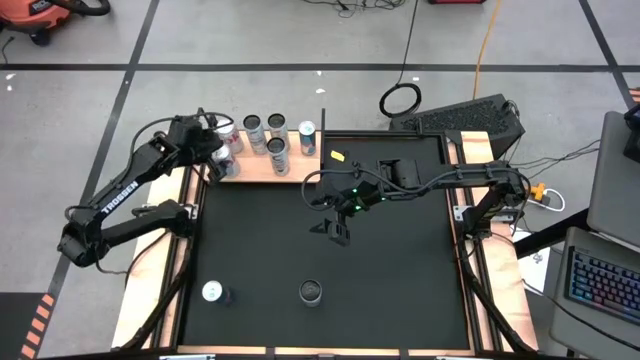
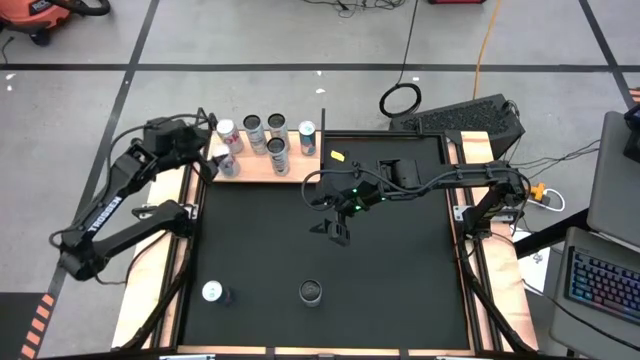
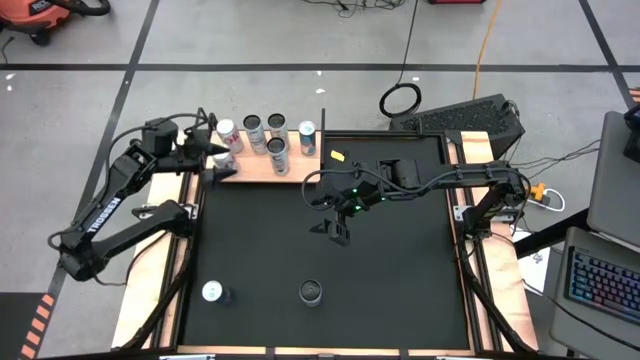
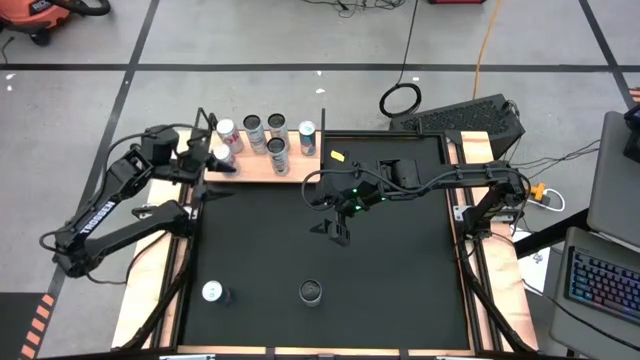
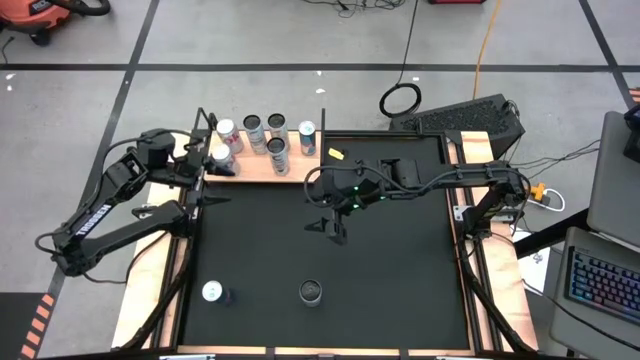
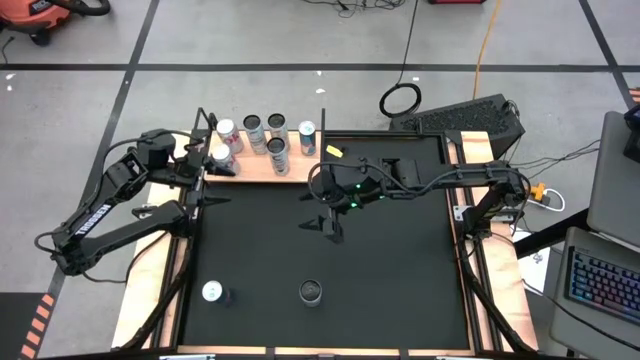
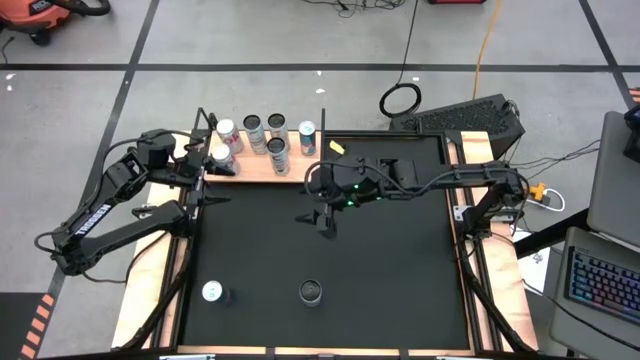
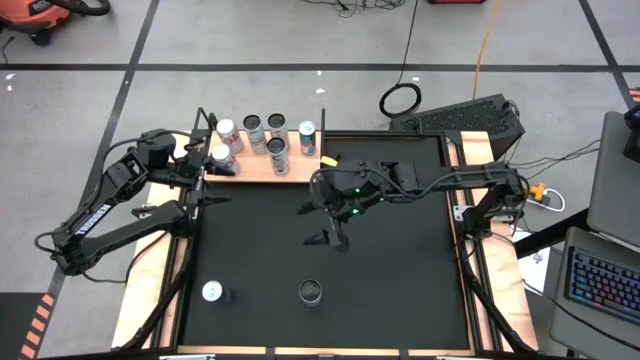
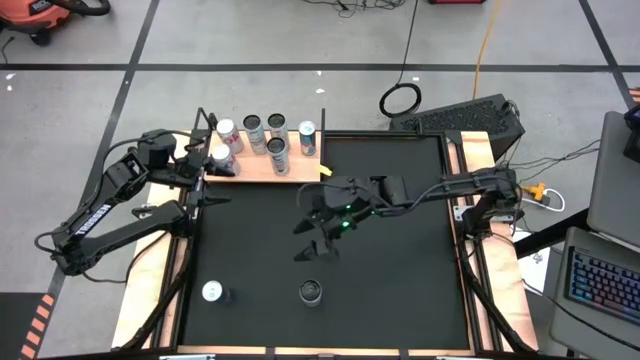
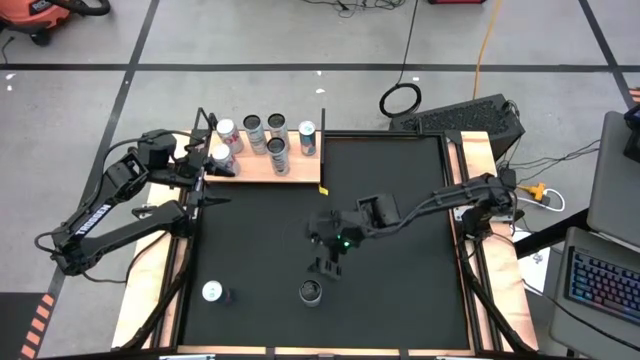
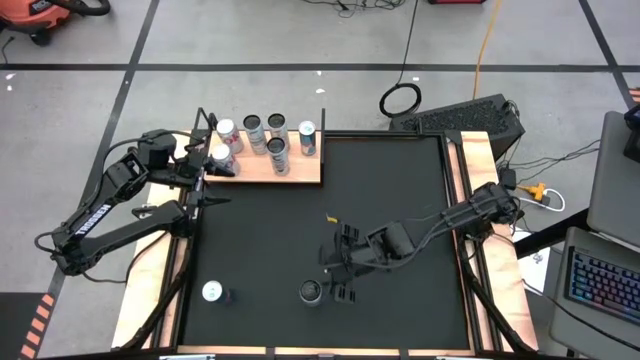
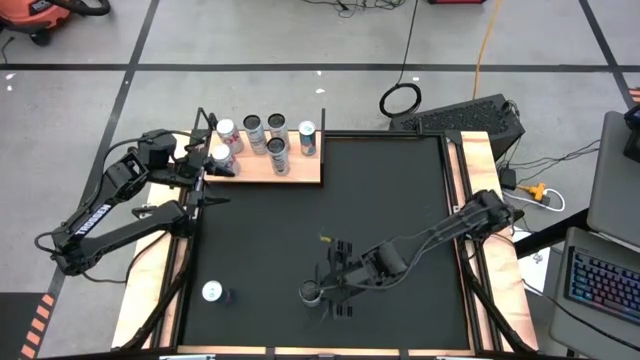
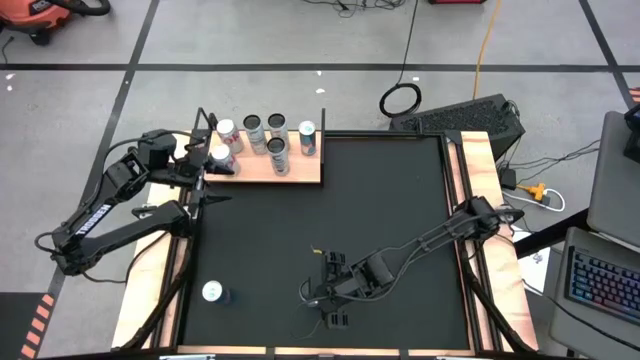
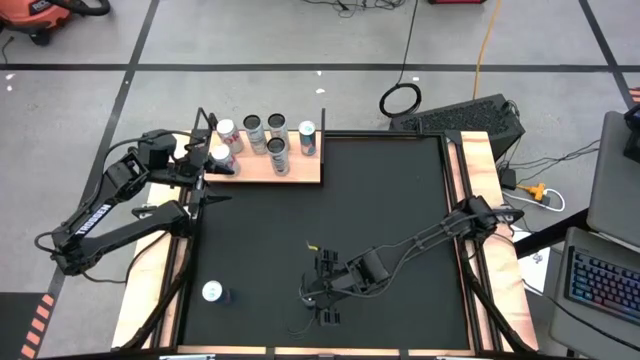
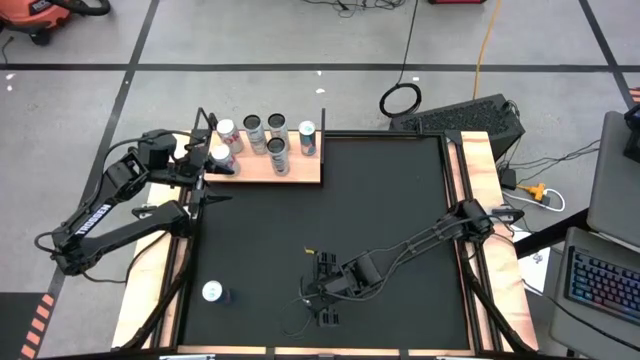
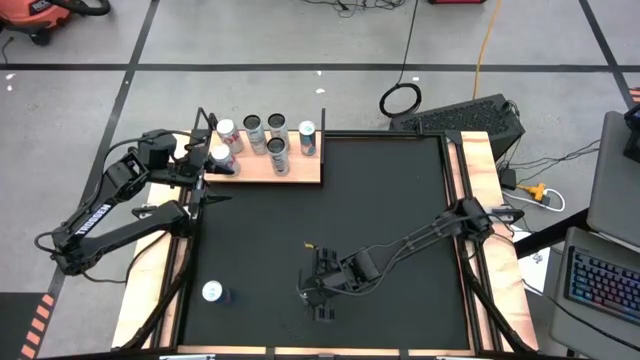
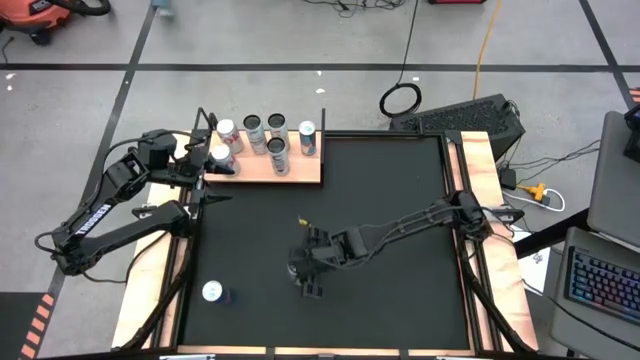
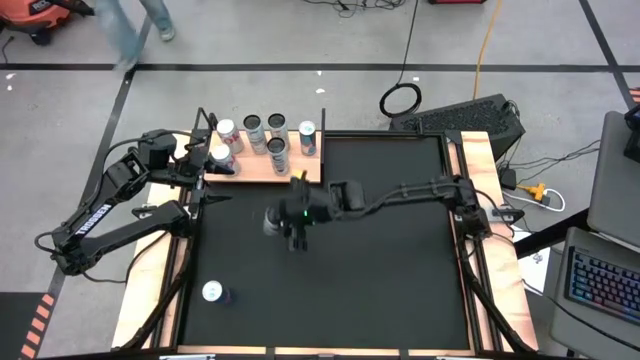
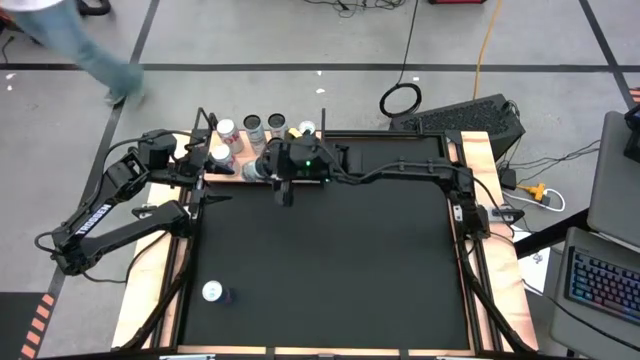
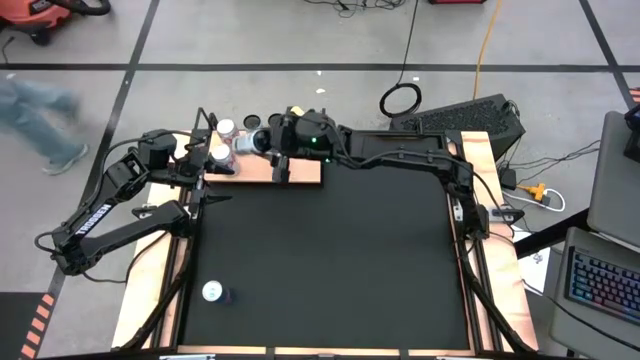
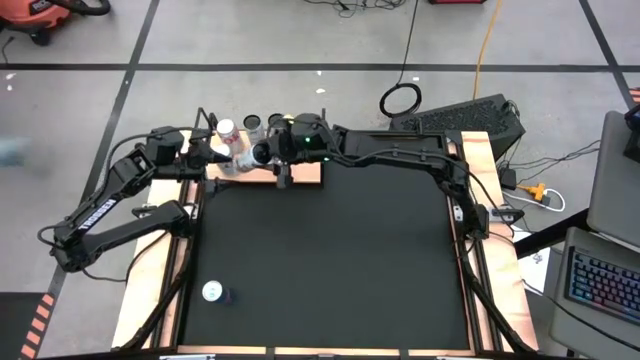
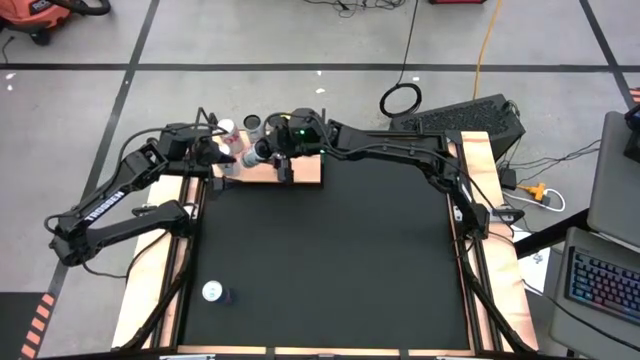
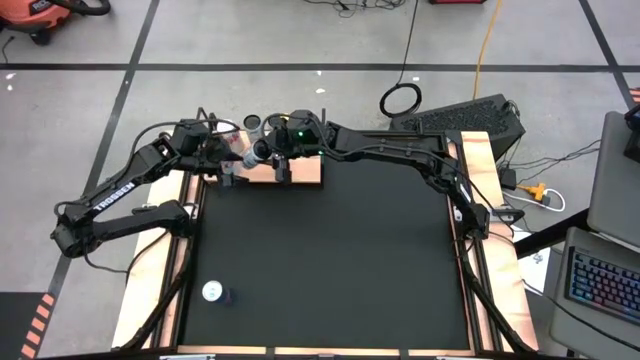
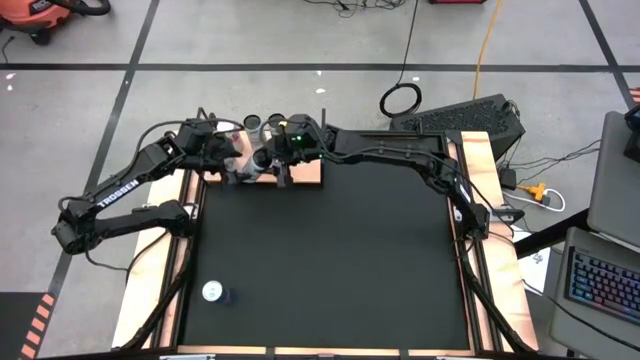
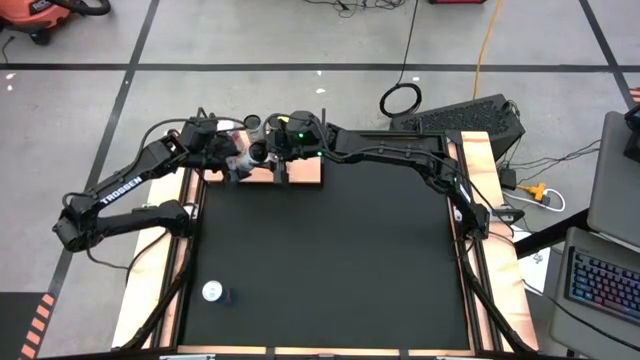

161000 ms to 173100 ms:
Task: Place canned beverage on shelf
Put the white blue soda can on the shelf aligned with the white blue soda can

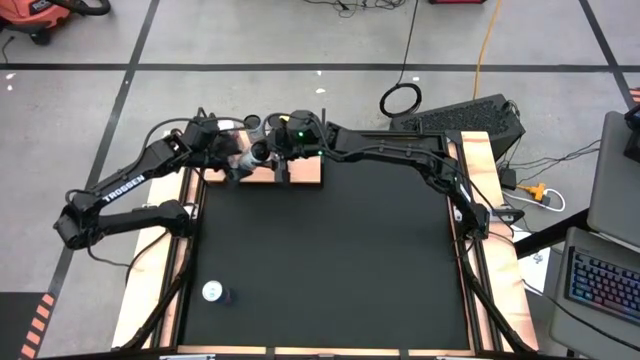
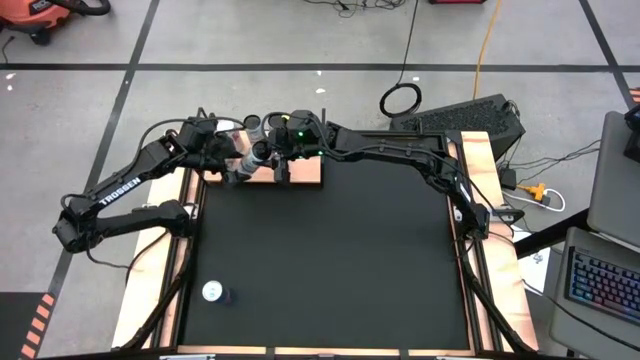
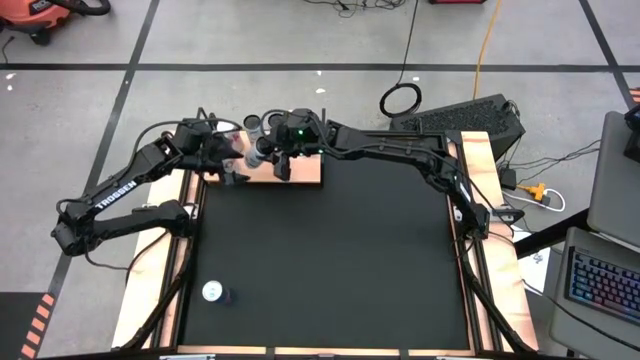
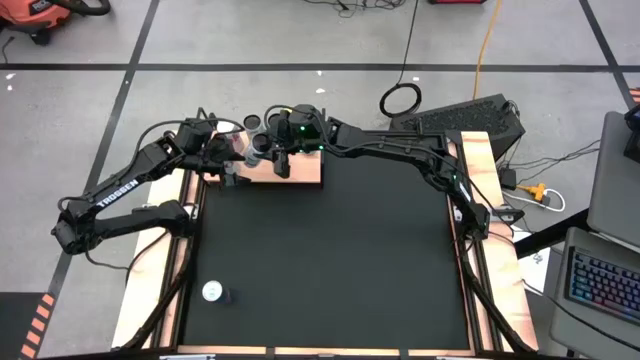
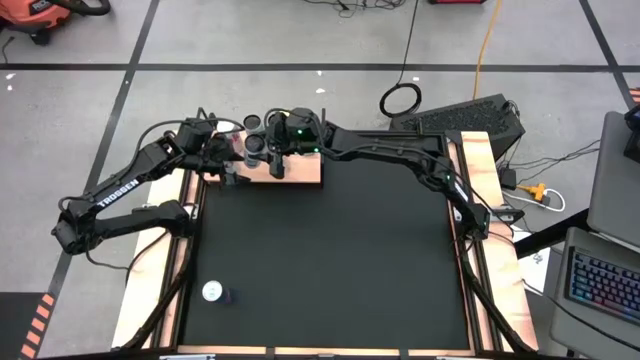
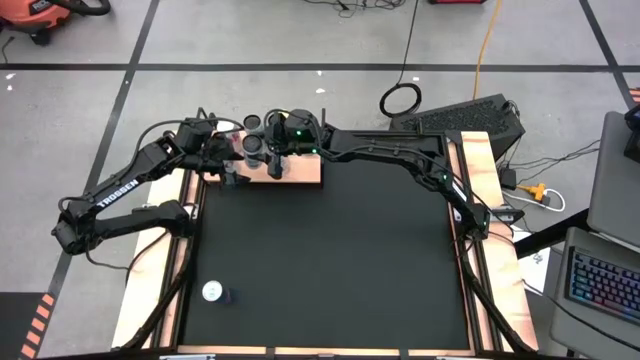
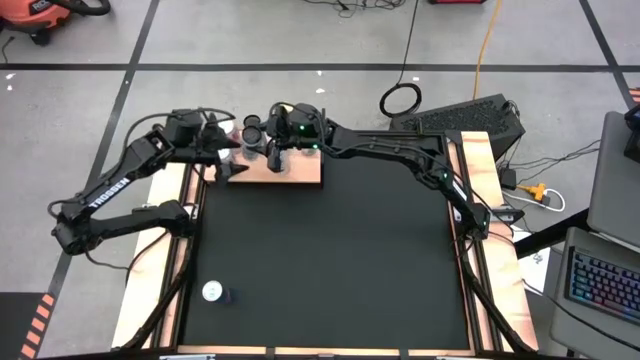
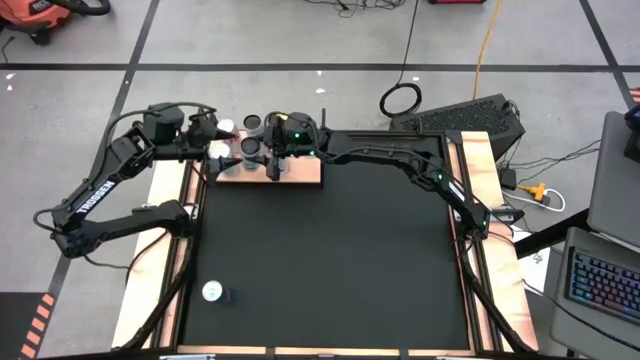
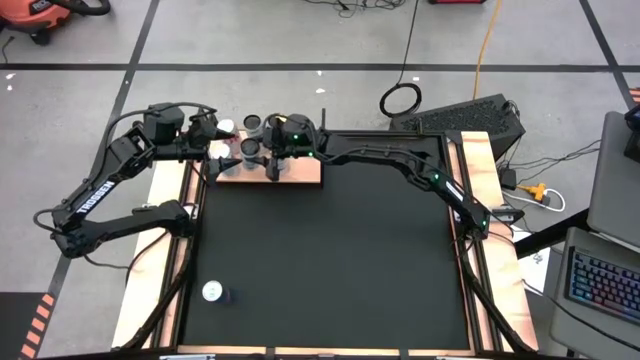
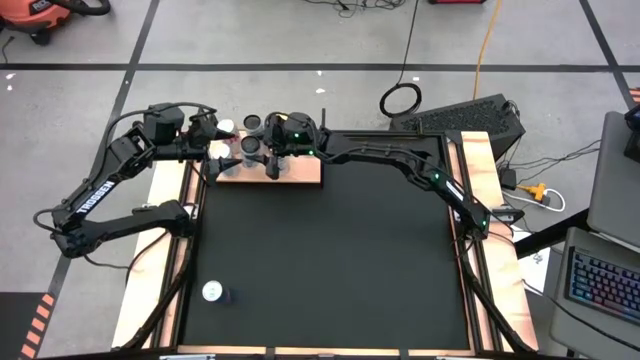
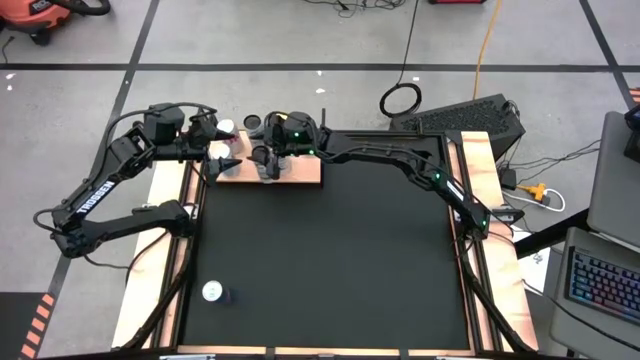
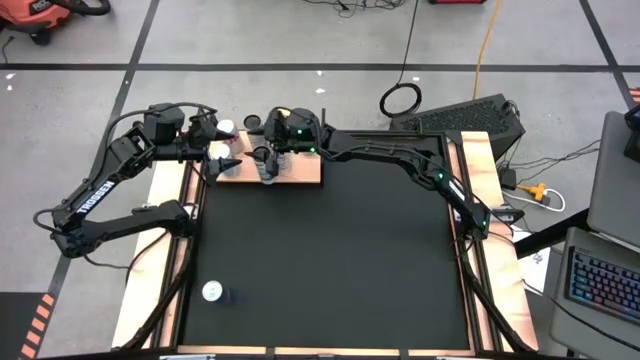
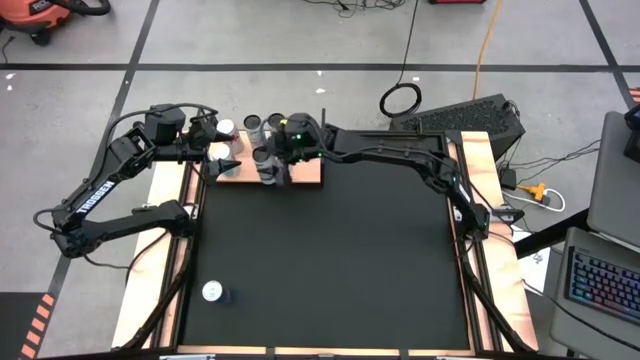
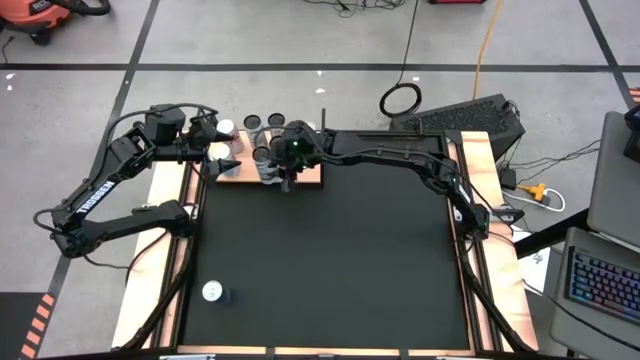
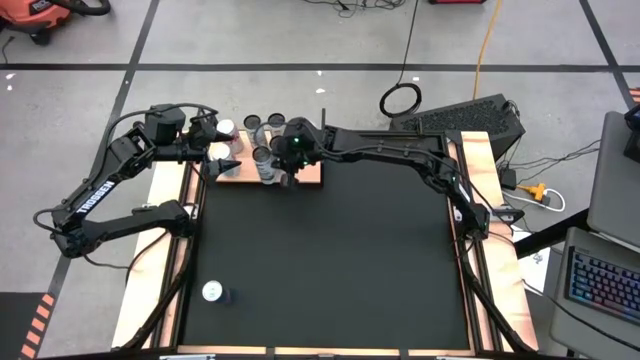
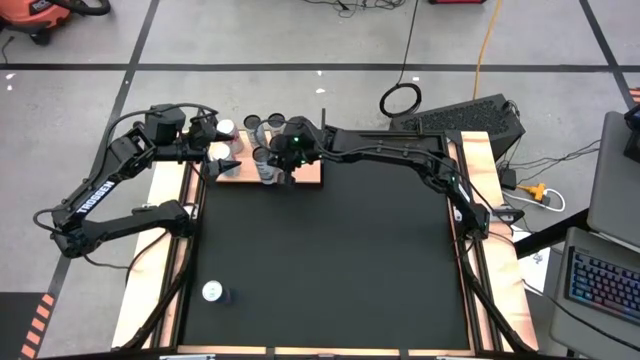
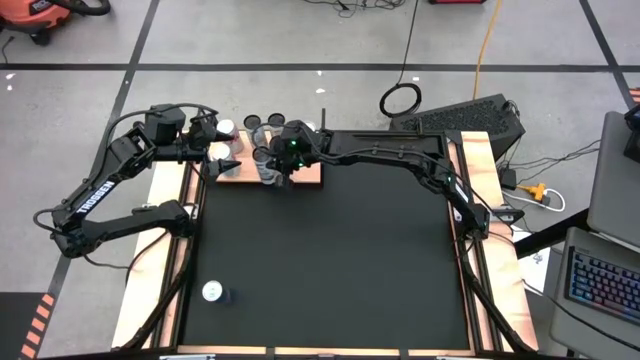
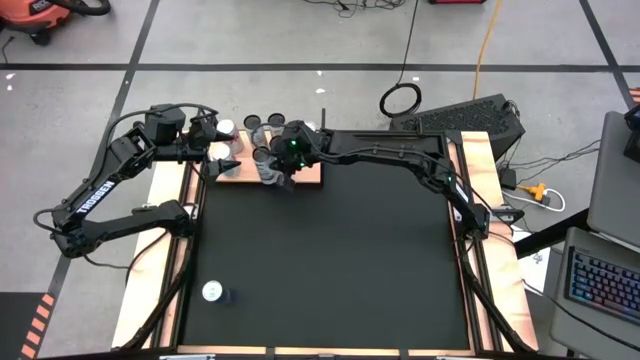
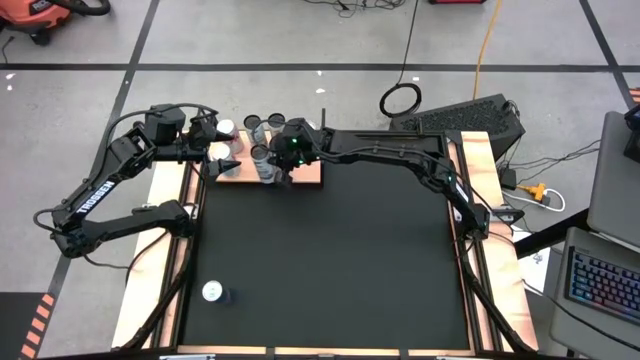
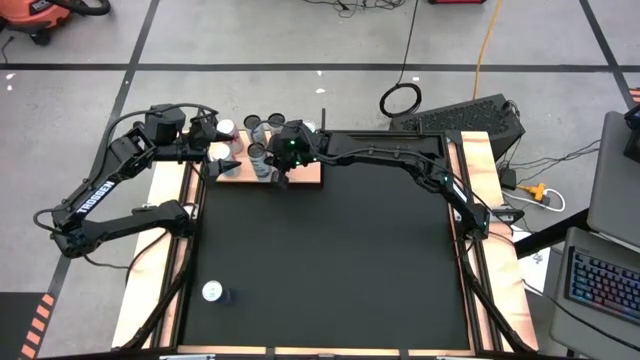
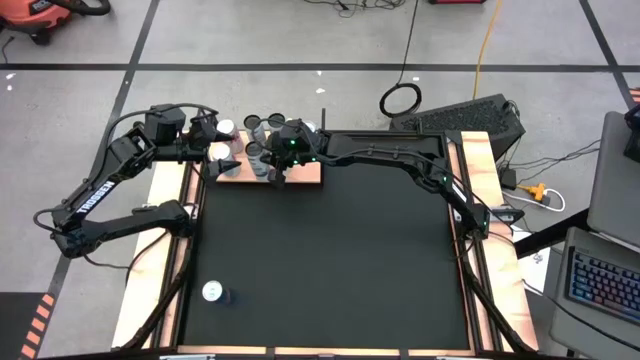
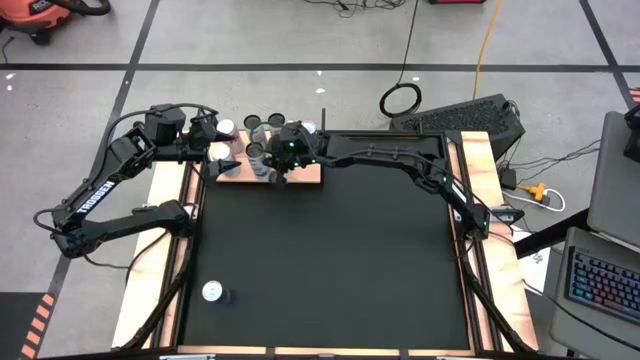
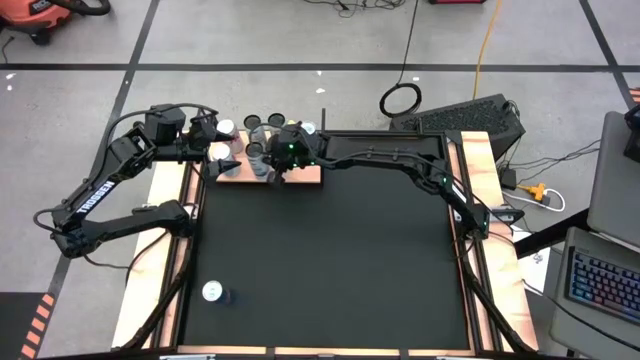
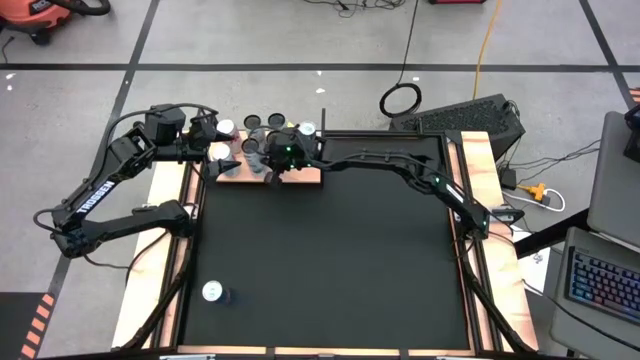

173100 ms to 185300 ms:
Put the white blue soda can on the shelf aligned with the white blue soda can
